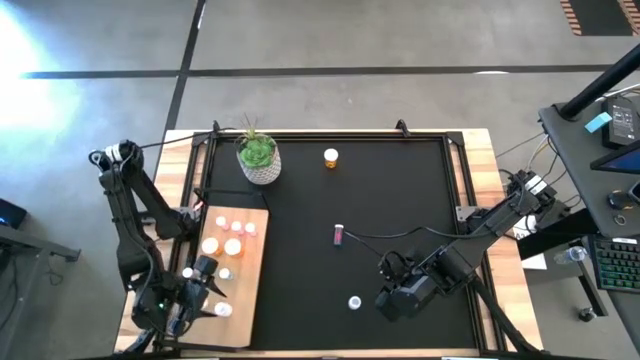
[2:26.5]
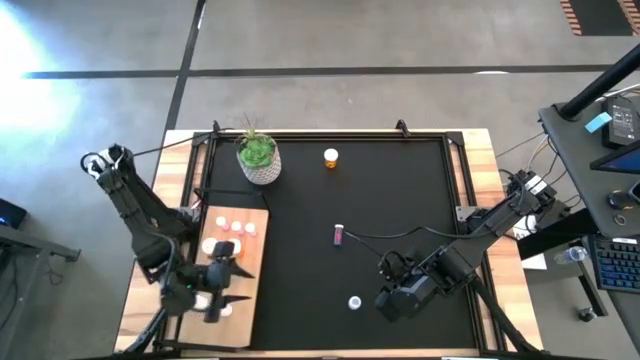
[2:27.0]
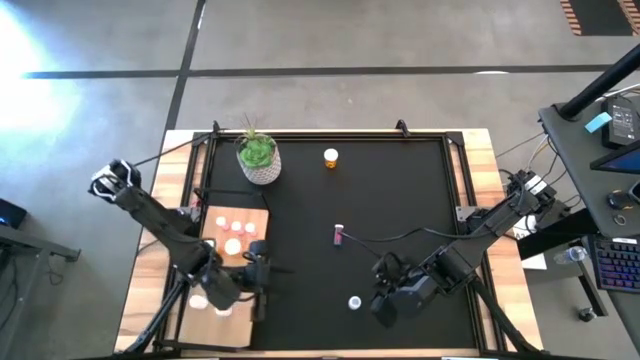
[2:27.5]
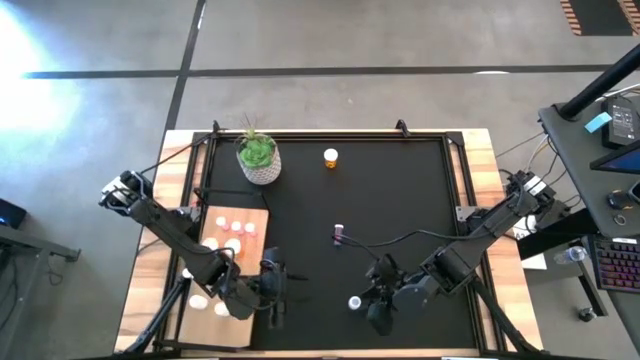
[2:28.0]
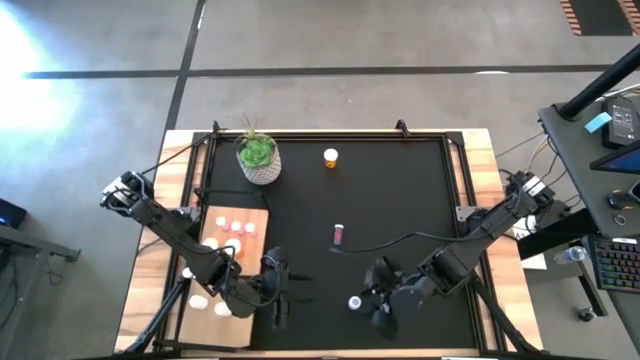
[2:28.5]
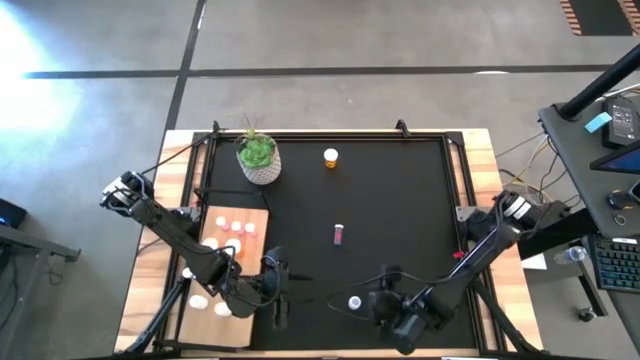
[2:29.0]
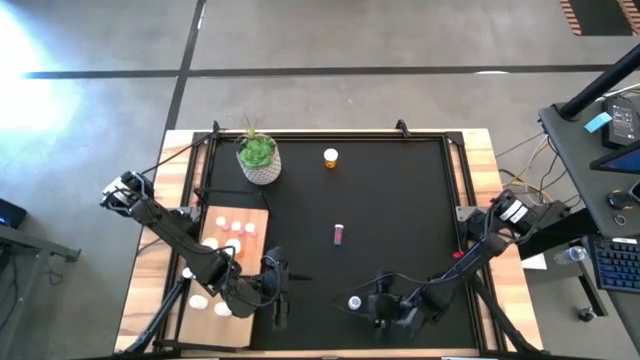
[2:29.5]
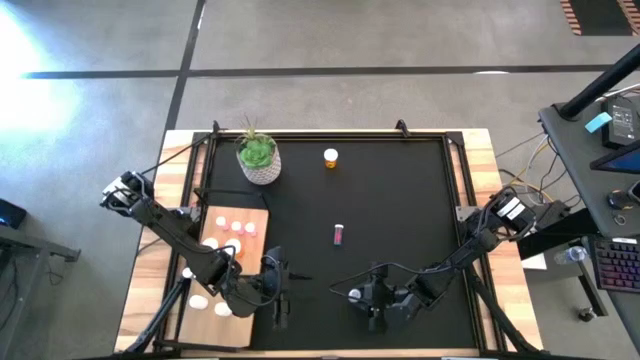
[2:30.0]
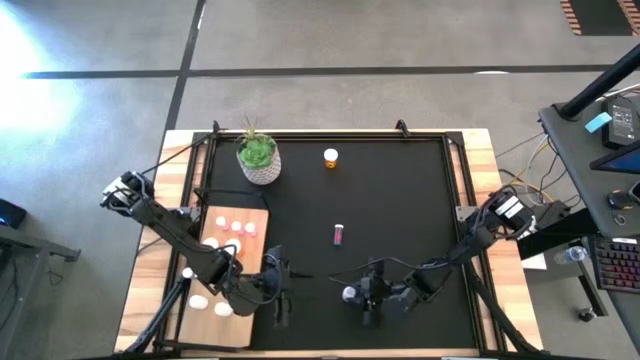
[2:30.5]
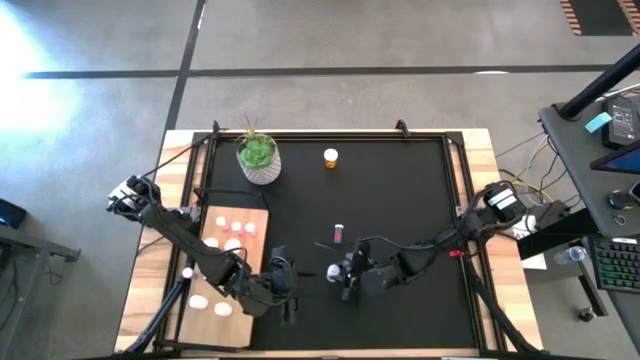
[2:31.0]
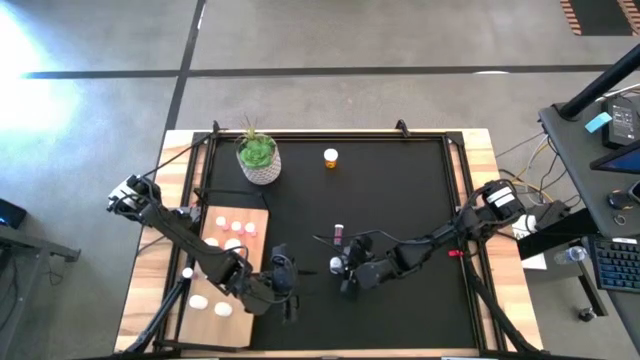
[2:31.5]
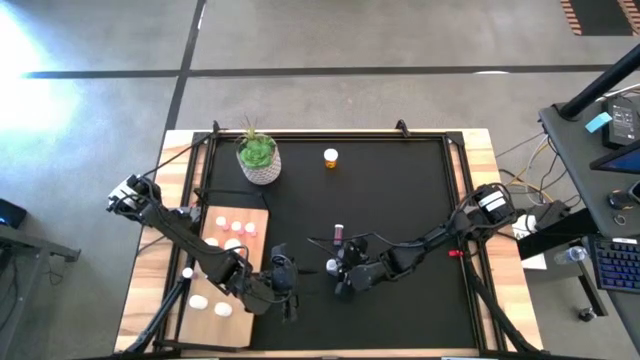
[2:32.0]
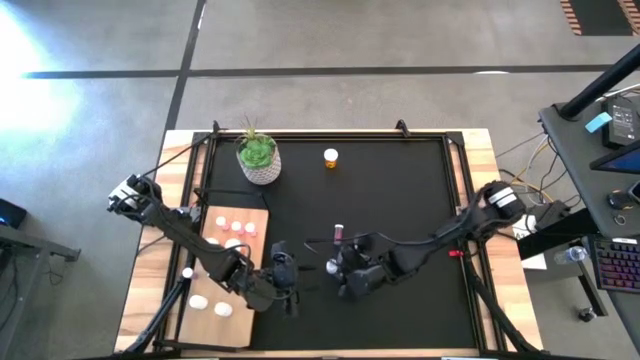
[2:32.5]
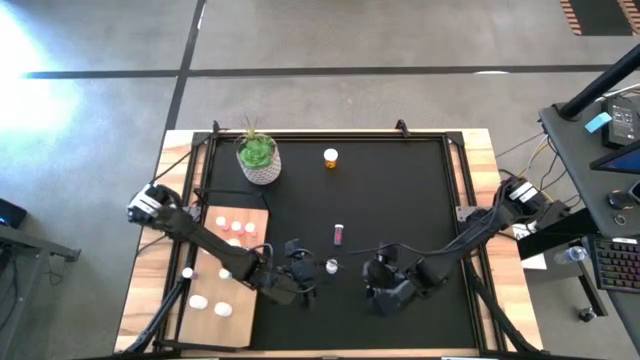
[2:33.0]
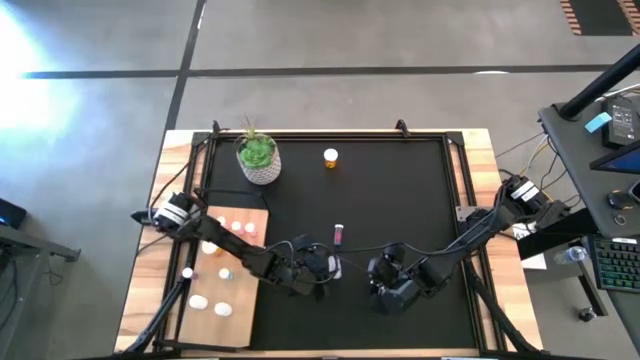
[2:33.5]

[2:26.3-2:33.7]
Task: Pick and place medicine bottles onto shelf by color
Put the white plastic pill bottle on the shelf aligned with the other white pill bottles

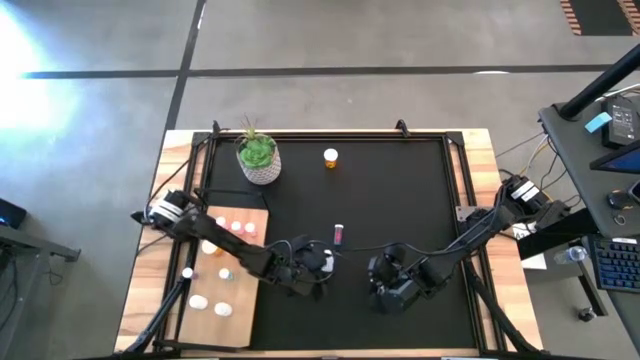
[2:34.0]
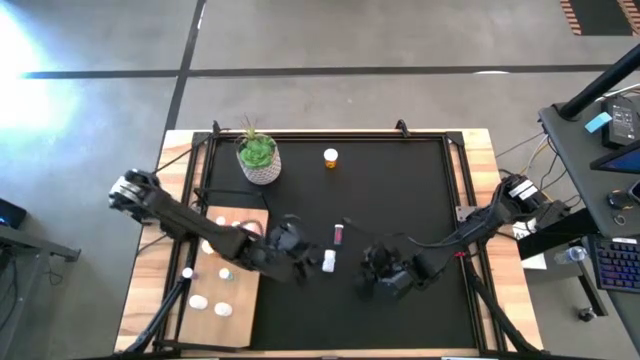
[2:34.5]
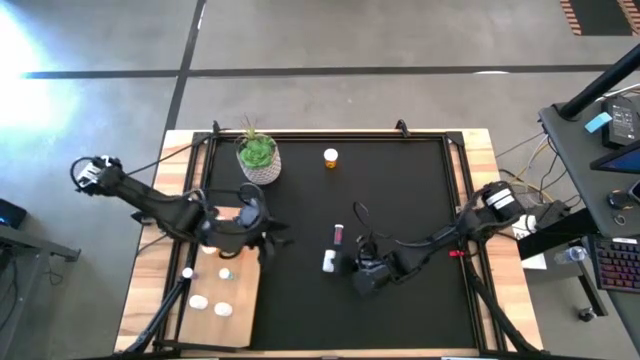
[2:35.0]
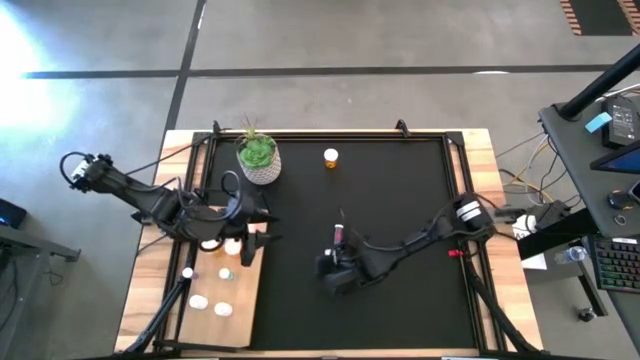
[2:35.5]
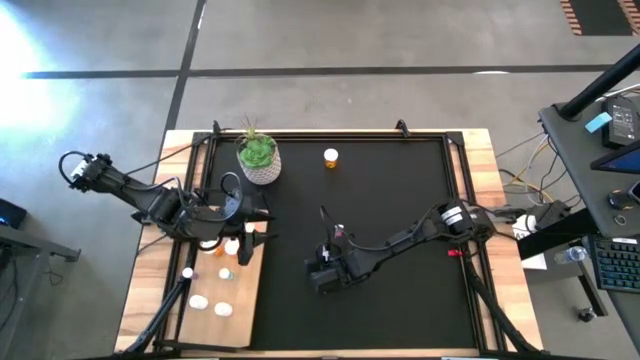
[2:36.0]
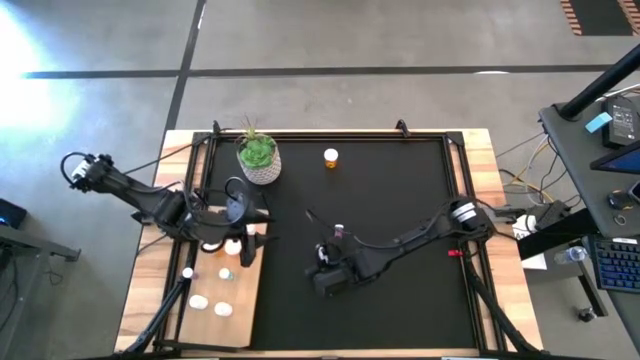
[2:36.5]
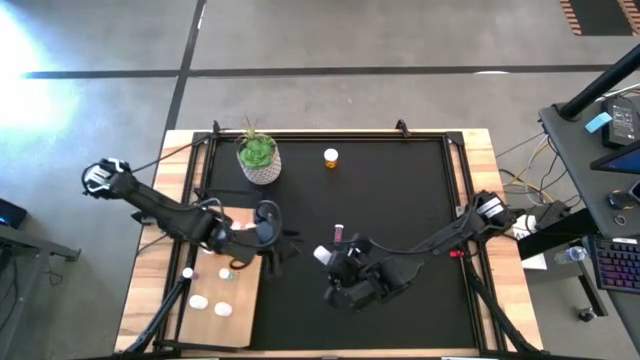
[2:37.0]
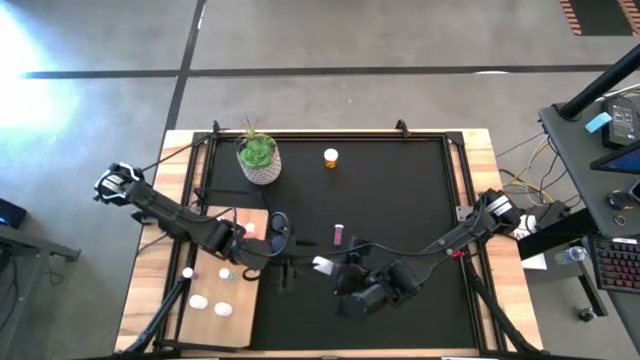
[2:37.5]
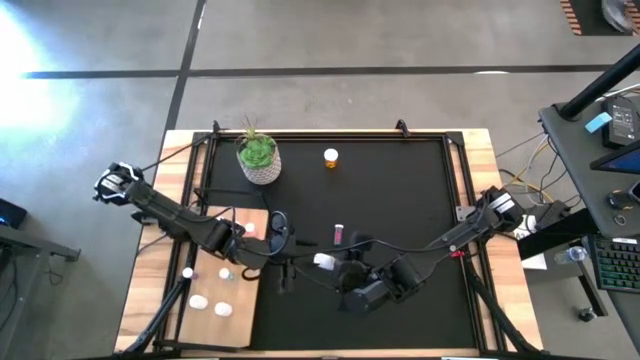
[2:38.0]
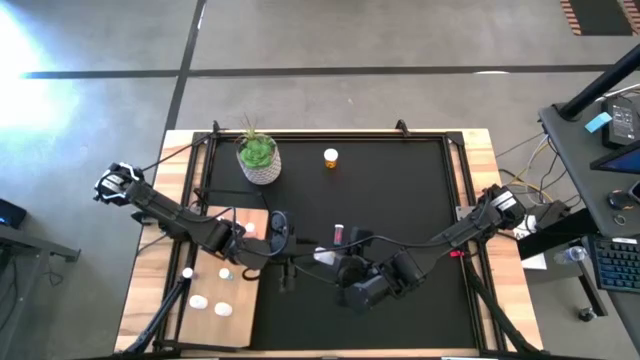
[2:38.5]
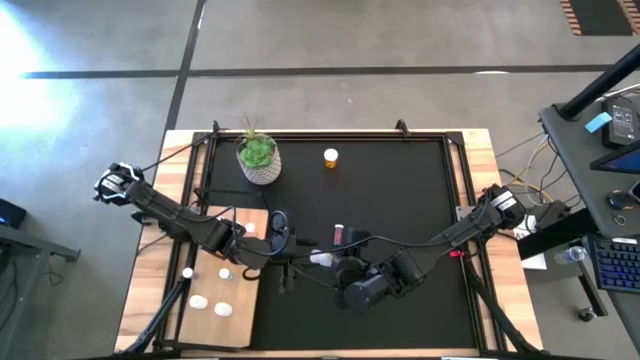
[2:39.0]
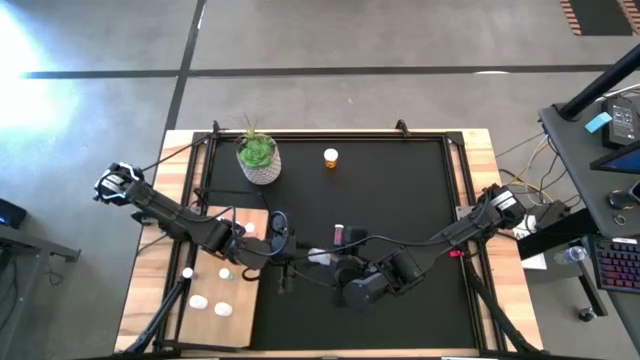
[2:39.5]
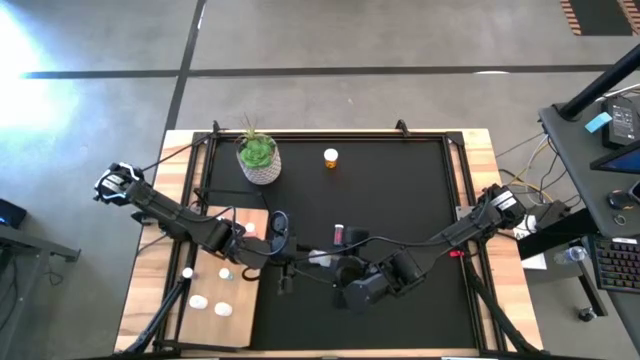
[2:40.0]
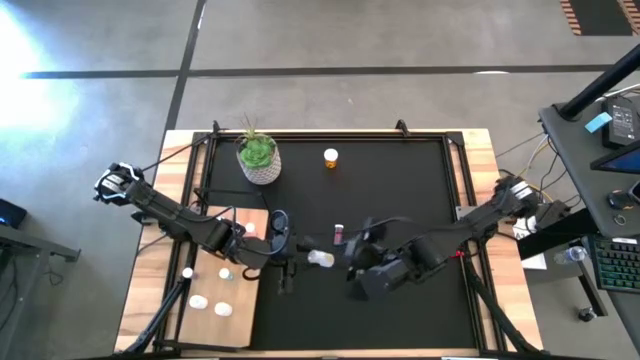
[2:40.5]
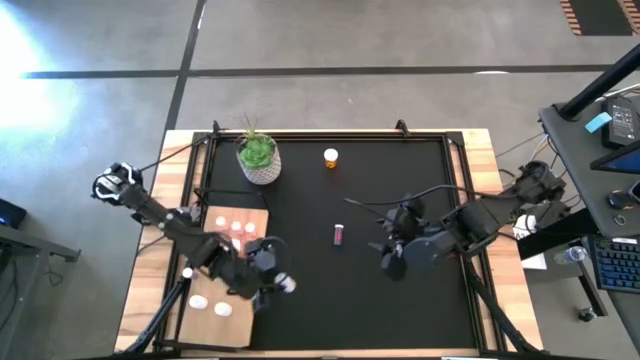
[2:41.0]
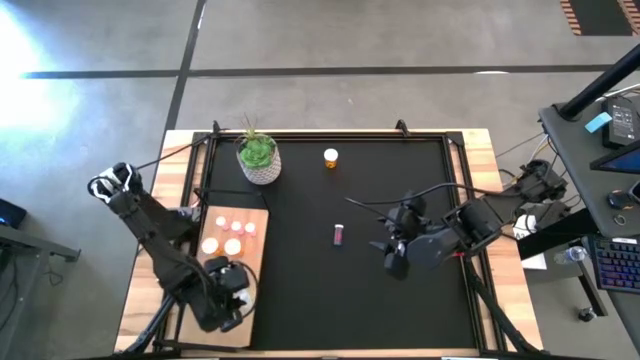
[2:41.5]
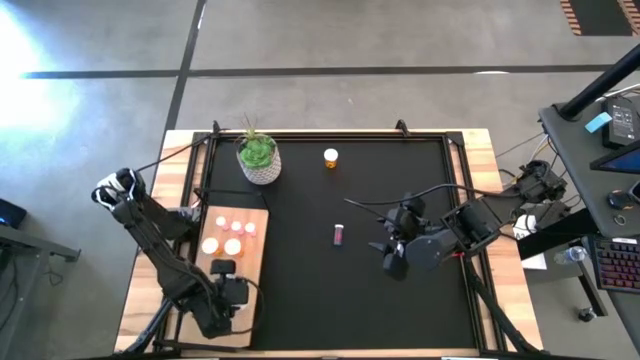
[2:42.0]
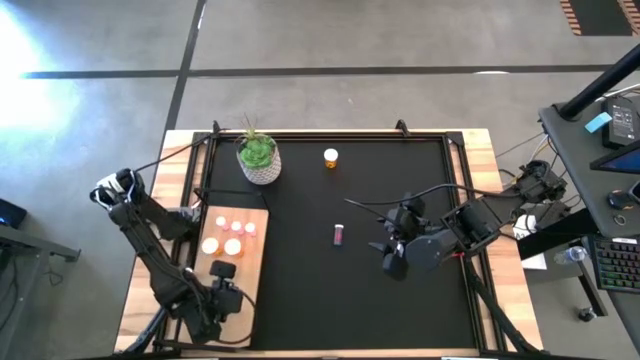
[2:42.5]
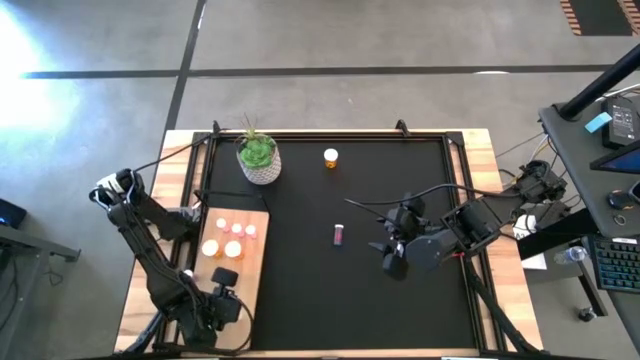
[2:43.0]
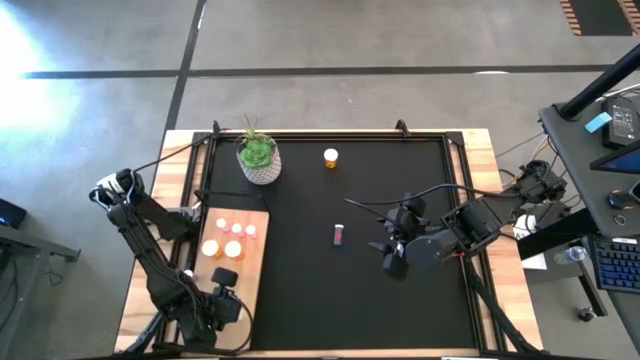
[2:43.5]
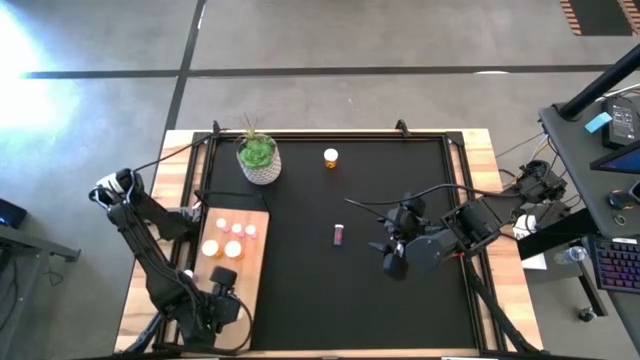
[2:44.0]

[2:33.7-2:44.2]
Put the white plastic pill bottle on the shelf aligned with the other white pill bottles

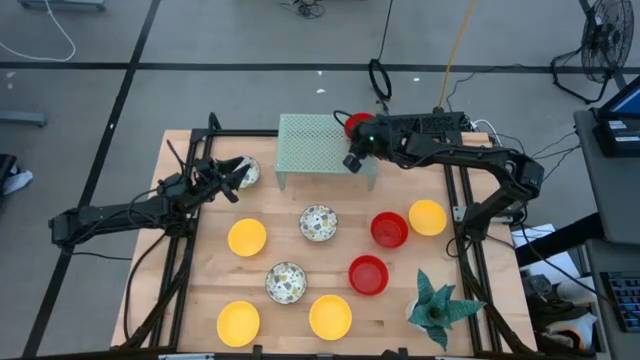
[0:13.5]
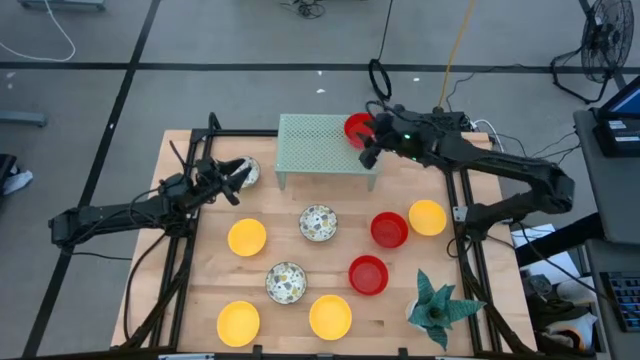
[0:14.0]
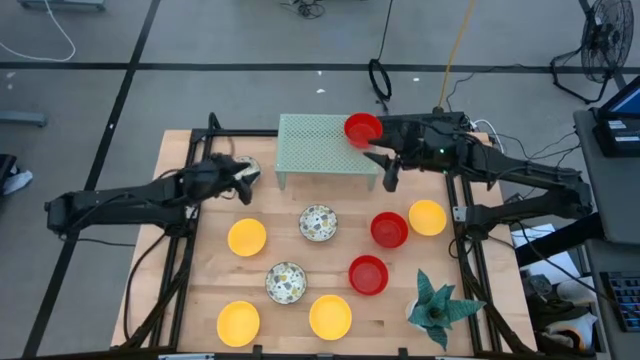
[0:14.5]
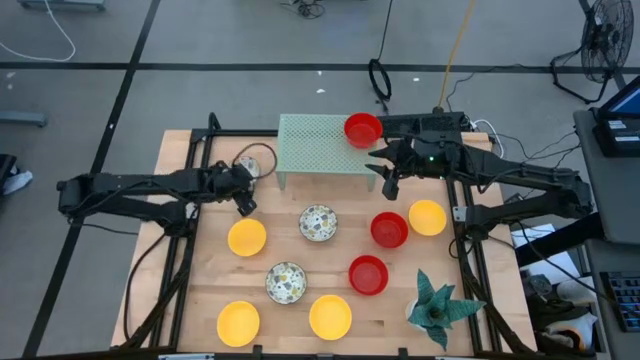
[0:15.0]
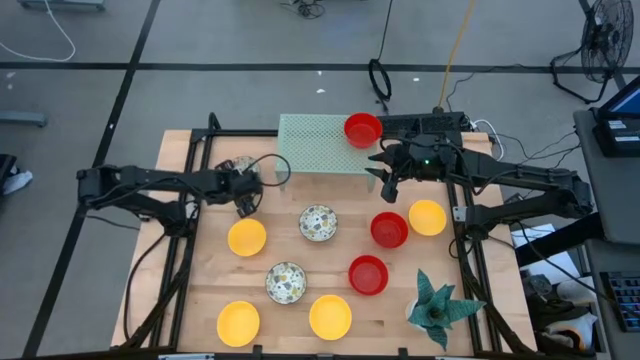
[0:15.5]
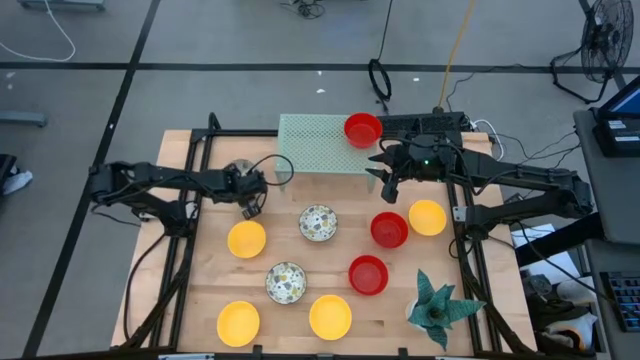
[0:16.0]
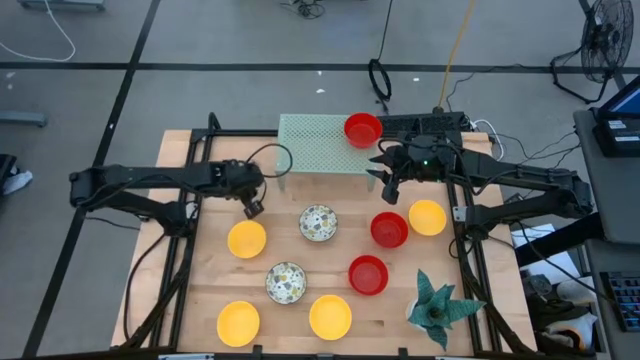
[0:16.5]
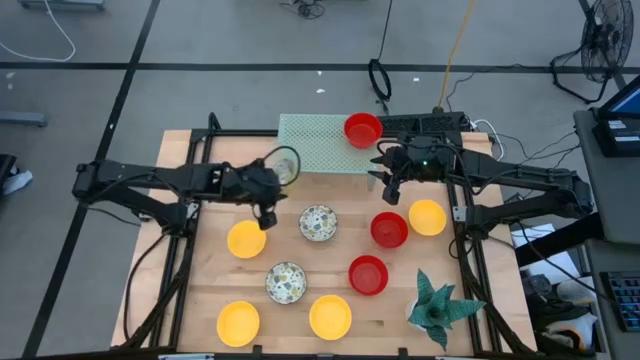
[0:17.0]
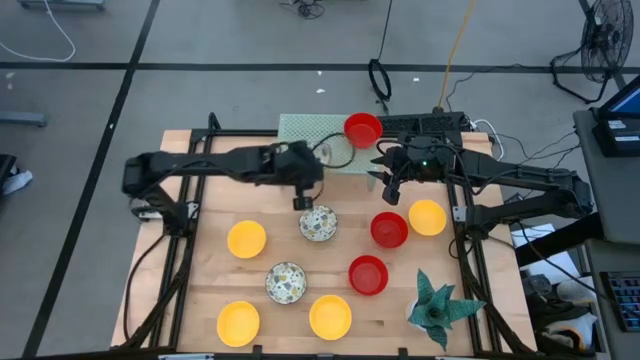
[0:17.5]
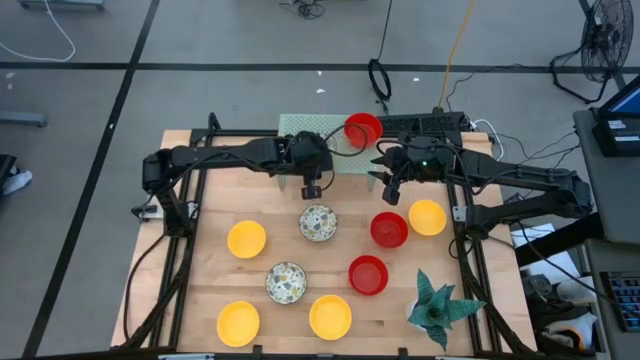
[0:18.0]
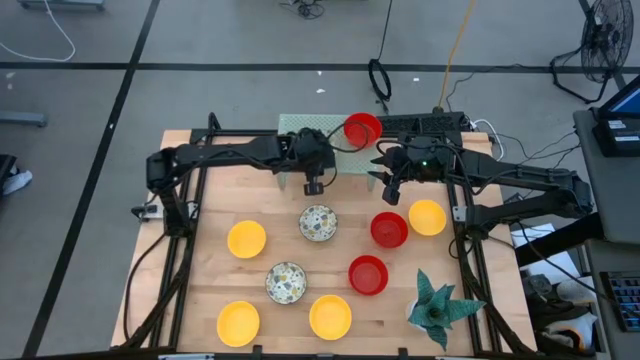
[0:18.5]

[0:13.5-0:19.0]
Task: Pick & Place Mini bowls
Put the white bowl on the shelf
